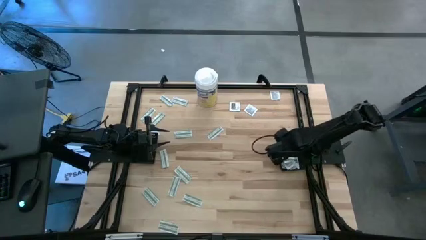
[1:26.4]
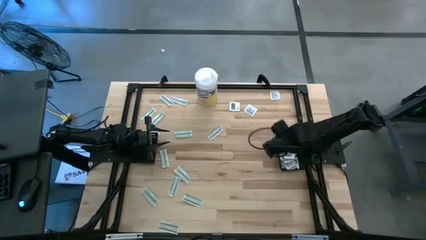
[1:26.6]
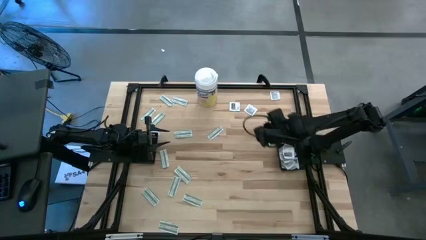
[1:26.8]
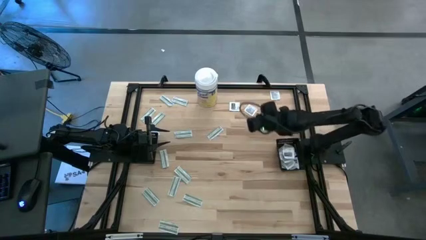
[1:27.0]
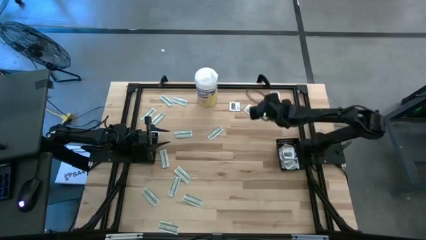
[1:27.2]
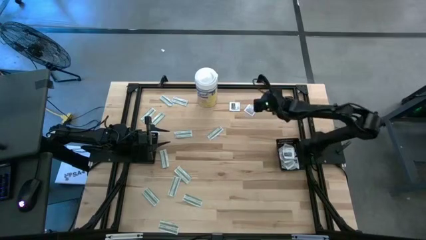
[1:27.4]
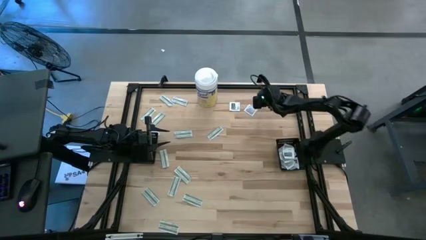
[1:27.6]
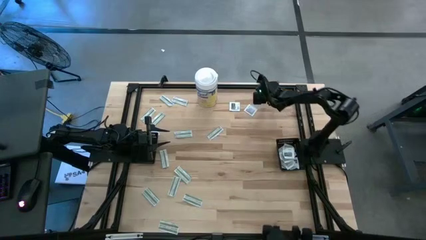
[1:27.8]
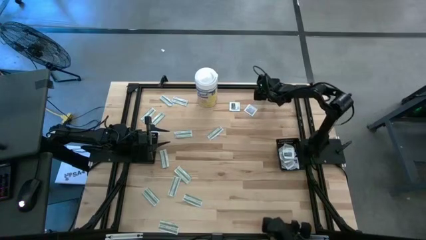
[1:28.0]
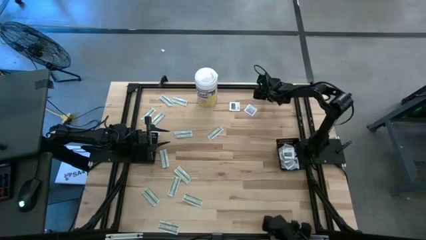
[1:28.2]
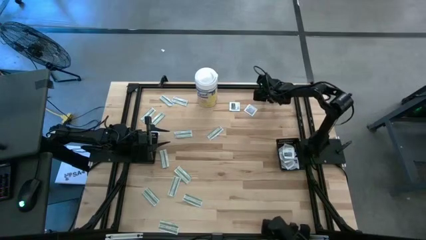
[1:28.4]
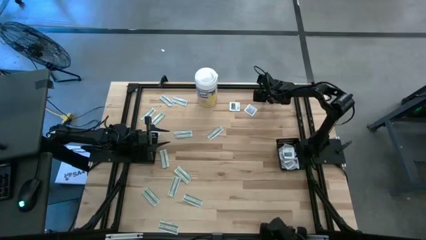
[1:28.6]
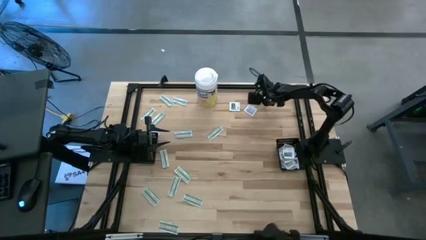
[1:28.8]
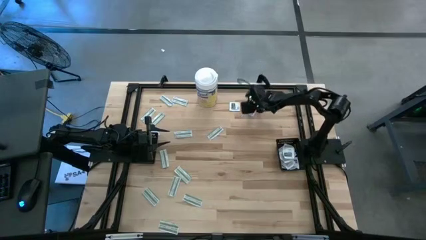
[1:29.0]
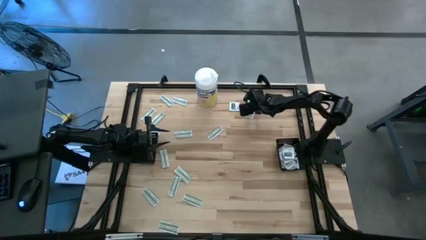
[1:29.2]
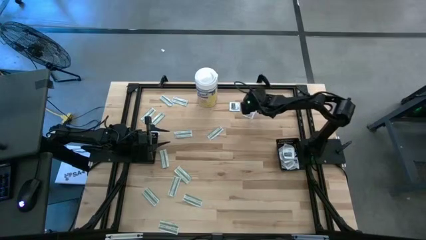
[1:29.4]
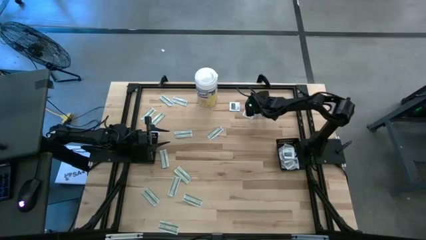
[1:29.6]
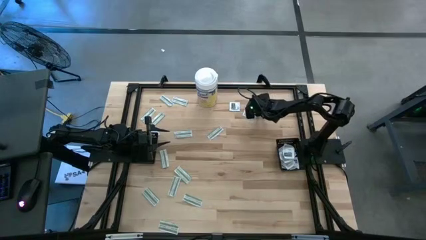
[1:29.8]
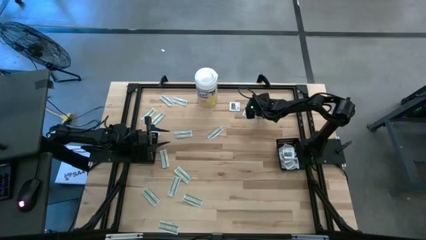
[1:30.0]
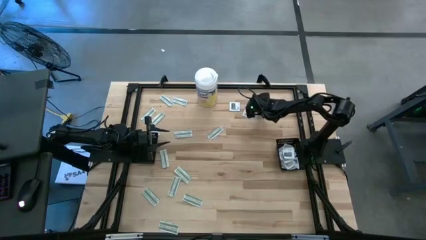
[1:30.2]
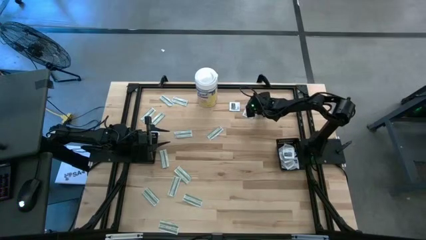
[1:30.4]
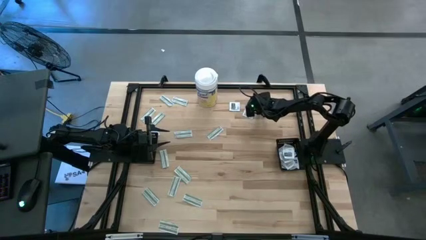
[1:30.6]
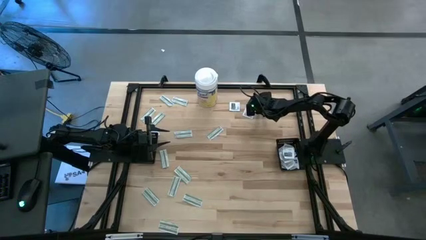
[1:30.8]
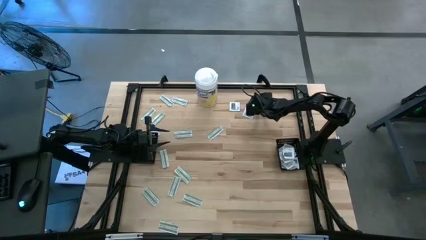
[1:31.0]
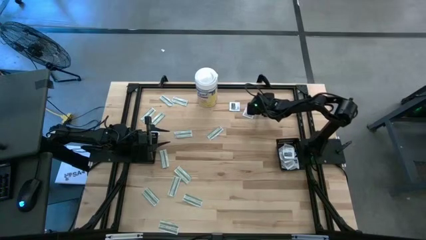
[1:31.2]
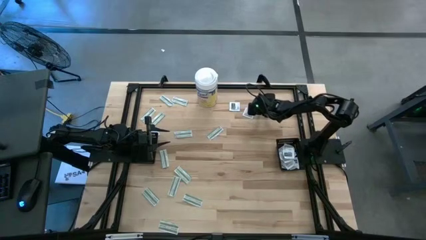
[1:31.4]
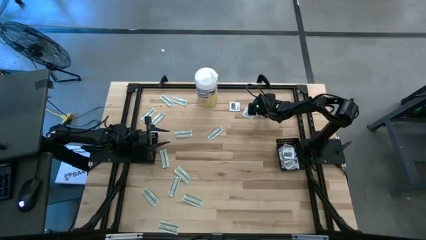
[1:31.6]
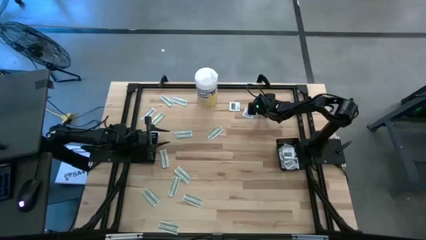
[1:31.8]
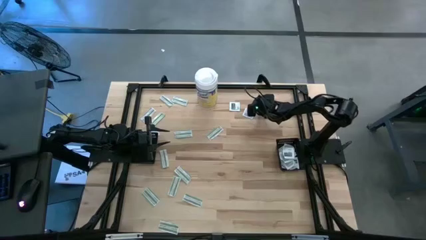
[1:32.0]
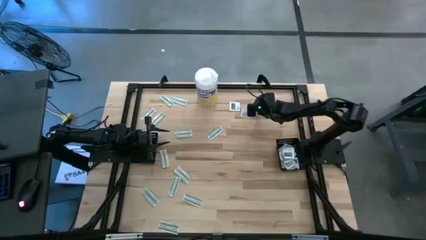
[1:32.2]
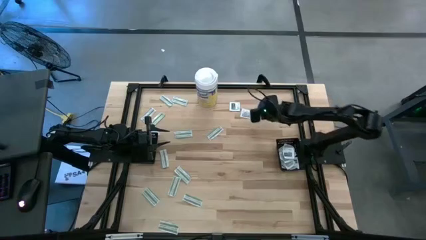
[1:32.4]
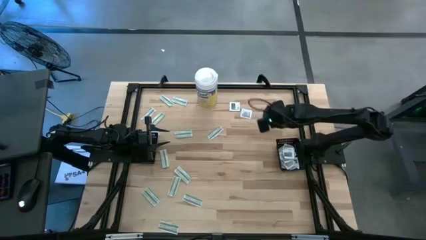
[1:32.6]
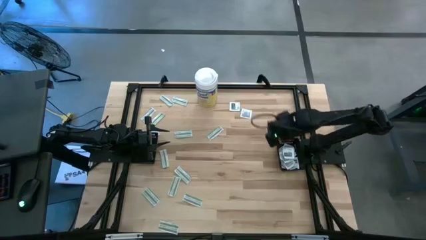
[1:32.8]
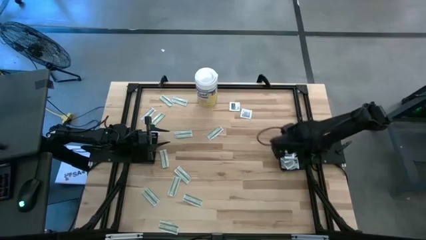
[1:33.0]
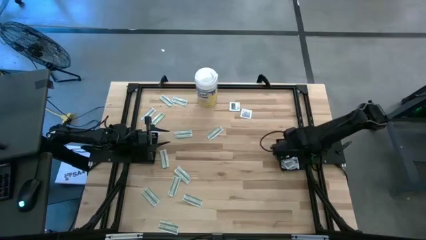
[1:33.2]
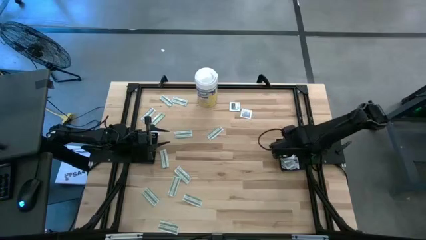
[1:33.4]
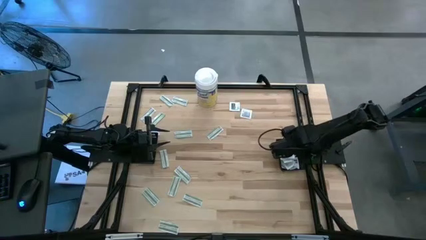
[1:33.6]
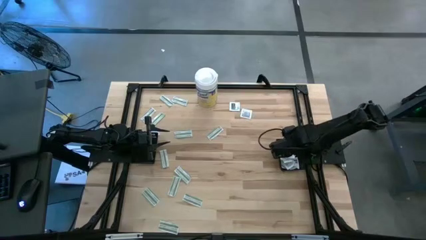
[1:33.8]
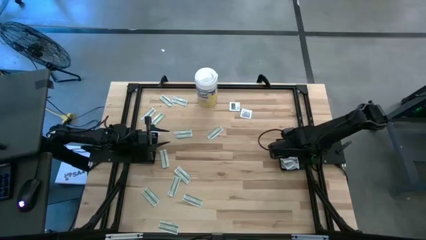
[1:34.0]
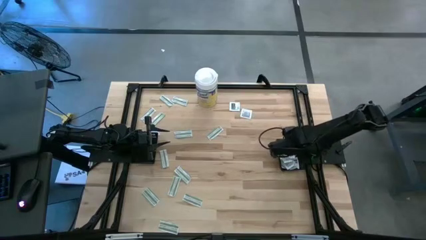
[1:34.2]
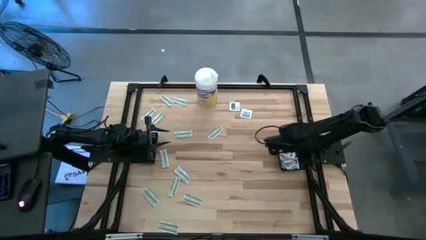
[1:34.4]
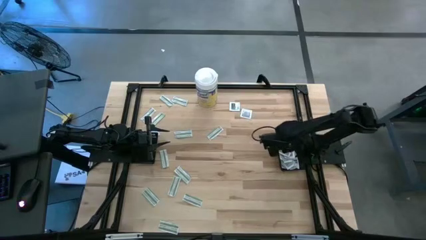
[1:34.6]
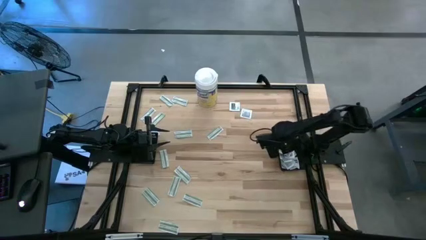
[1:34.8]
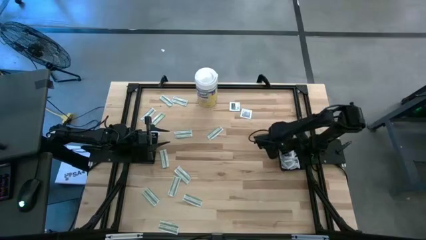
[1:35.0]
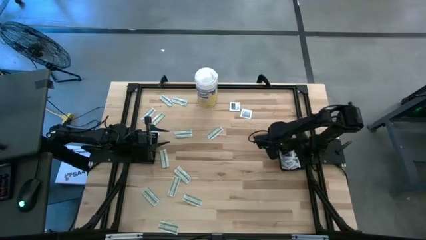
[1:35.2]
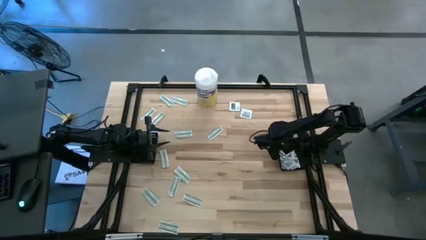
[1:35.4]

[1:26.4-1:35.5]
Task: Pick & Place First Aid Supplies
Put the towelette pack into the right black basket

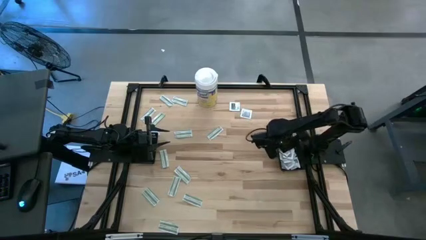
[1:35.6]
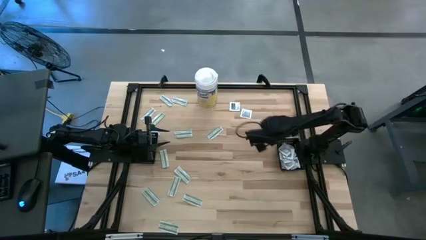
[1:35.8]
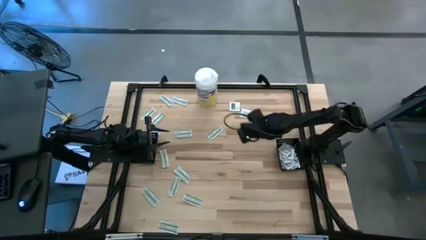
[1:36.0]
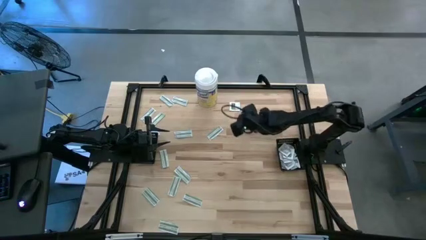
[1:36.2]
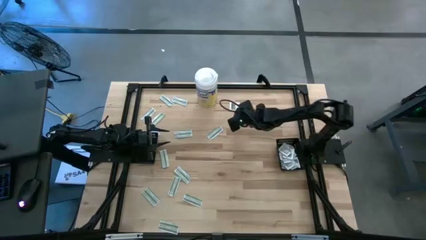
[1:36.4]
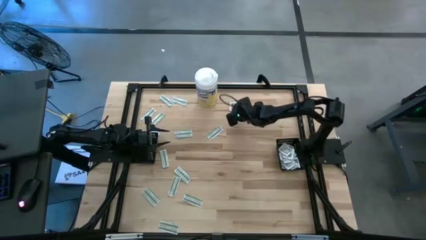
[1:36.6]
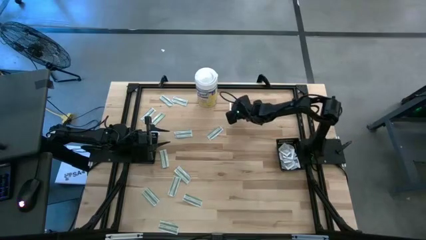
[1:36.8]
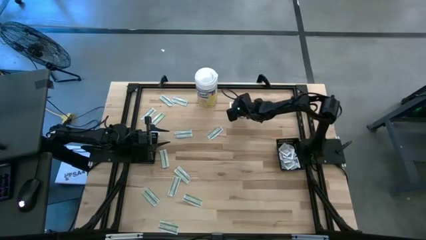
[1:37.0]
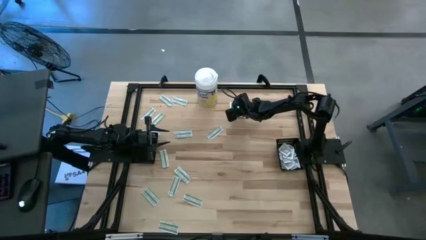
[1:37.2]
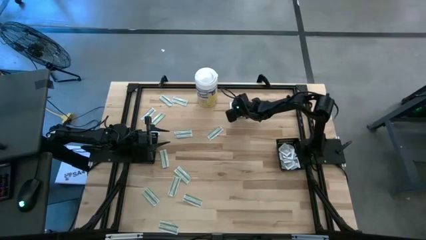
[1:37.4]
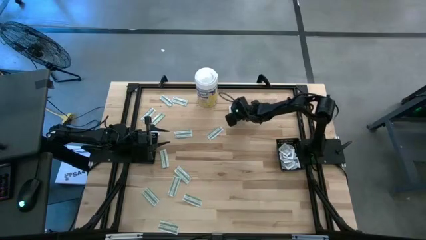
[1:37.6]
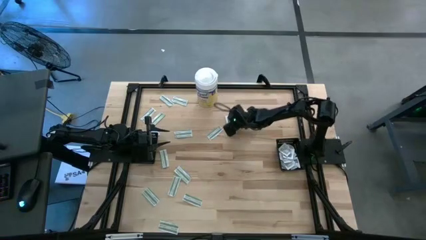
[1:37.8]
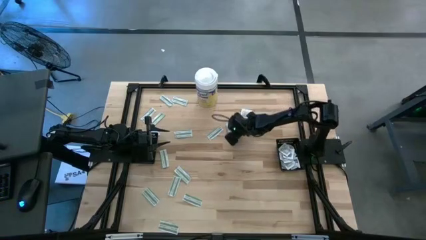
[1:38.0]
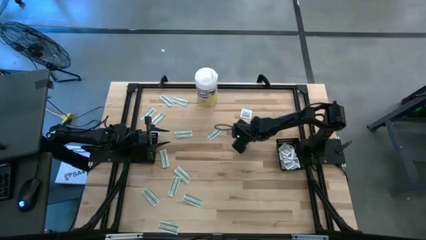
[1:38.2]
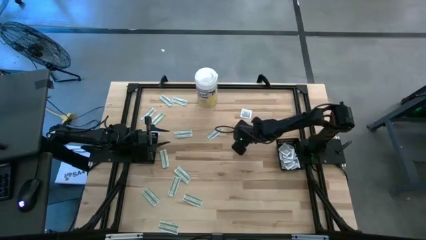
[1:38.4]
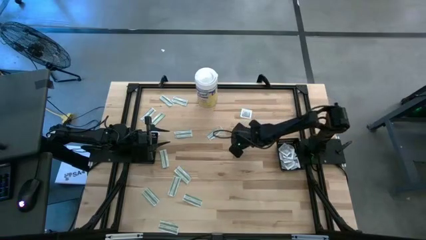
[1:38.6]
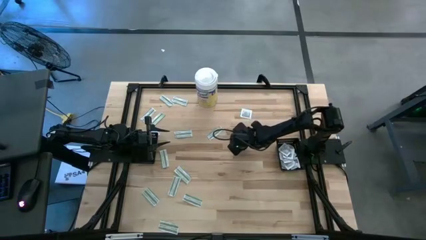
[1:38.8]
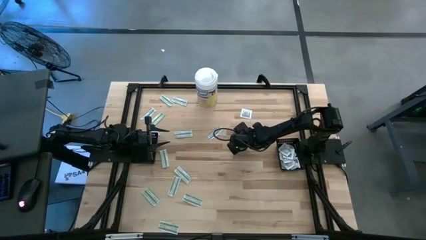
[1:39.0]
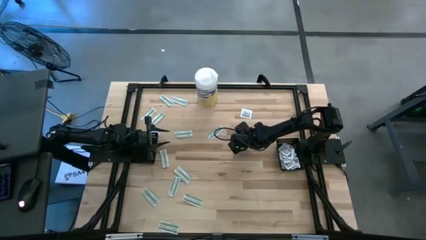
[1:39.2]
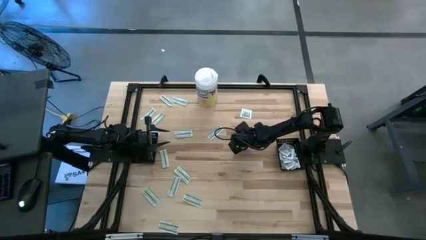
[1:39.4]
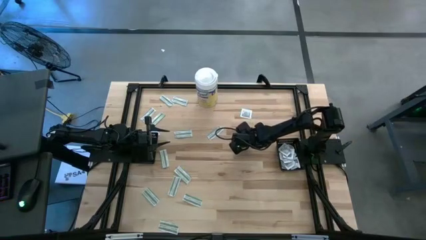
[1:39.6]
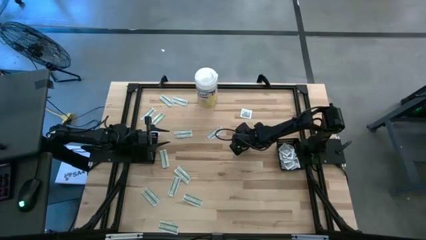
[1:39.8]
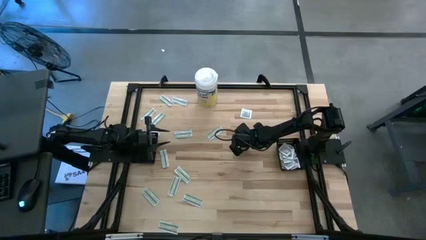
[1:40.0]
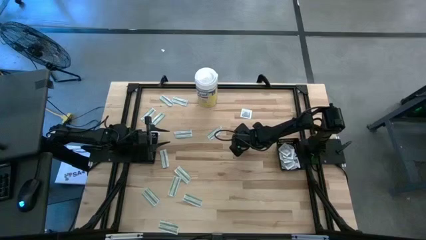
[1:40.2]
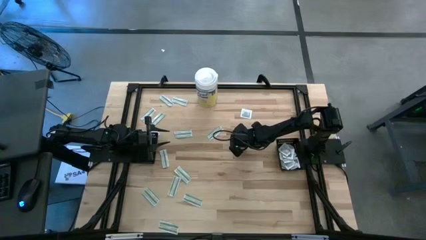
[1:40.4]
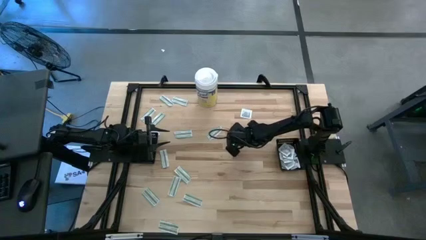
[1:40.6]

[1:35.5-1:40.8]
Put the towelette pack into the right black basket

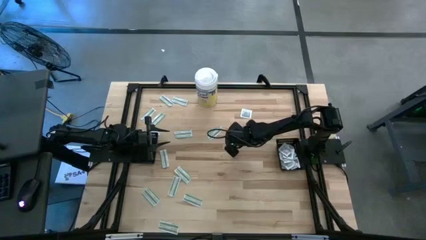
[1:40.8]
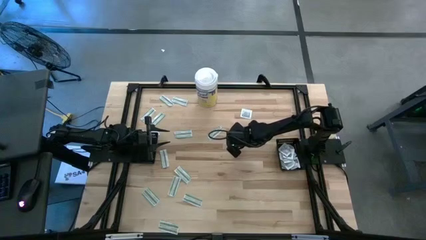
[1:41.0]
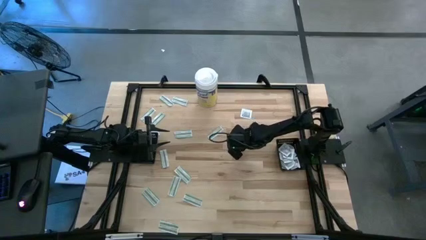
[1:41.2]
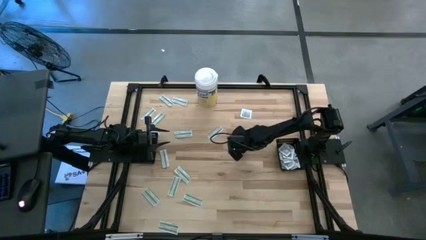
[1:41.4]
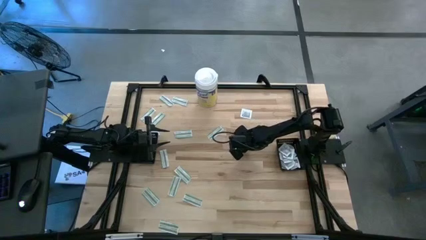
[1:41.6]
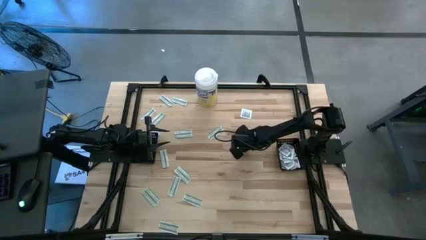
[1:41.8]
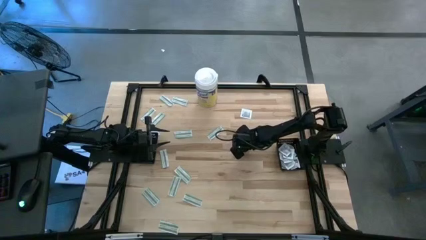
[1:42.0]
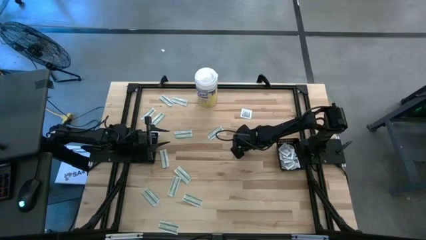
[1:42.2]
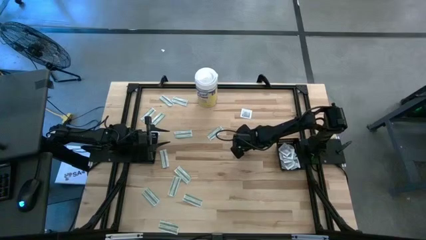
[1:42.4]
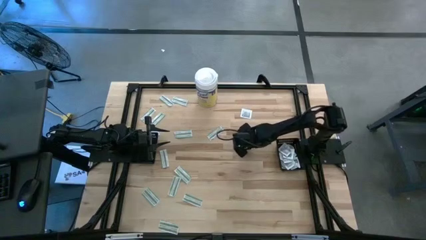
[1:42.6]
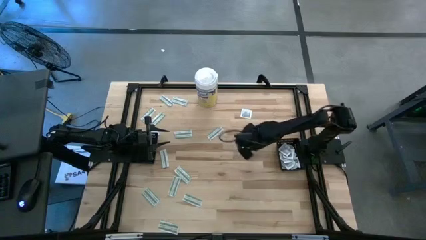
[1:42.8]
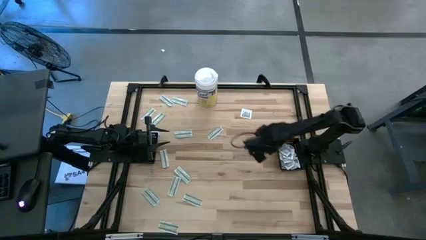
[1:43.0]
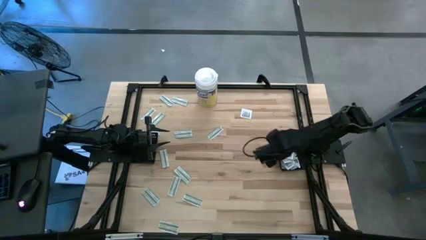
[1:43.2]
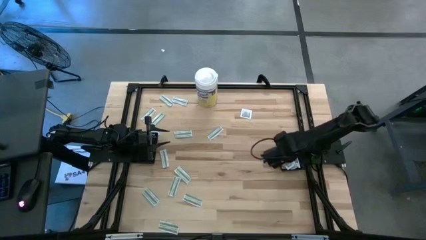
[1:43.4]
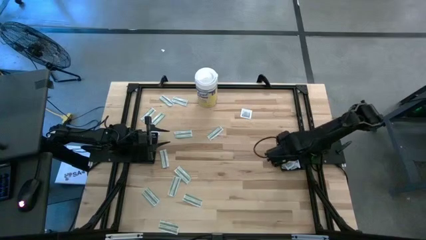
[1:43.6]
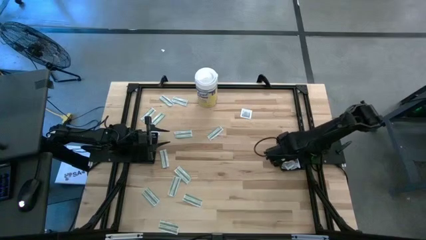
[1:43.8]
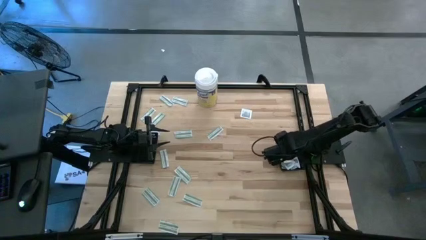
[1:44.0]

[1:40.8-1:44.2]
Put the towelette pack into the right black basket
